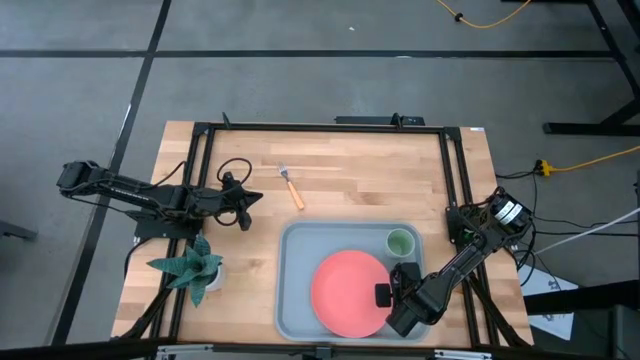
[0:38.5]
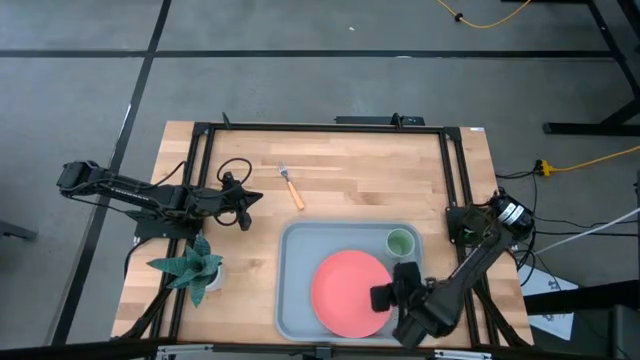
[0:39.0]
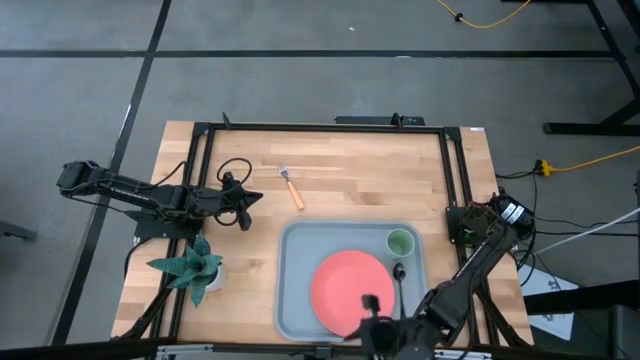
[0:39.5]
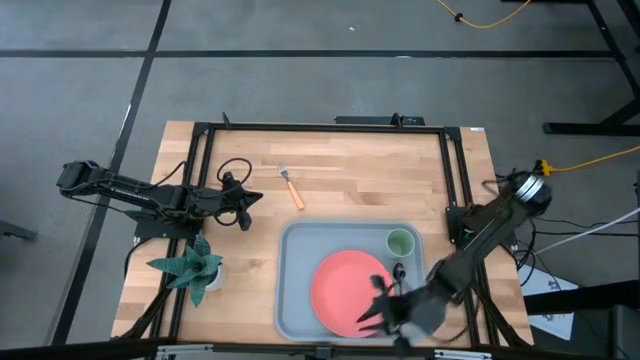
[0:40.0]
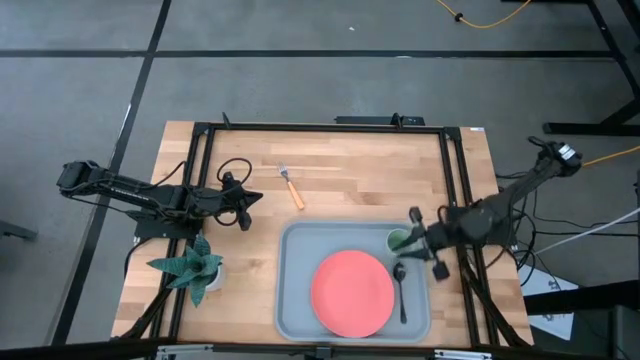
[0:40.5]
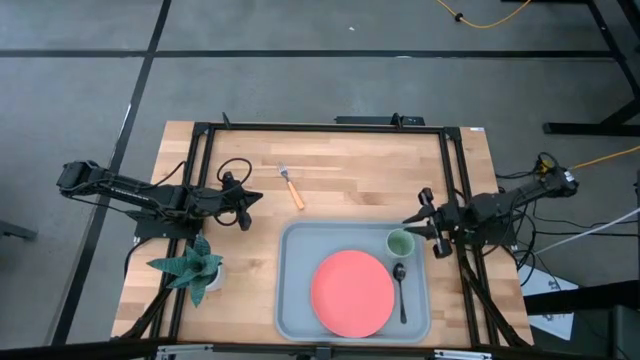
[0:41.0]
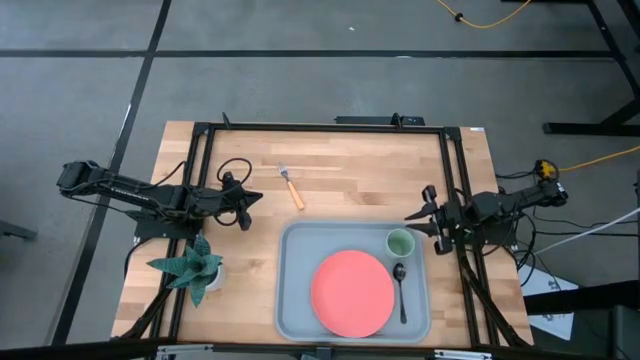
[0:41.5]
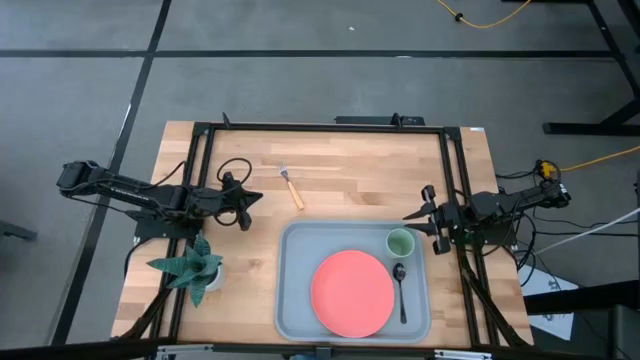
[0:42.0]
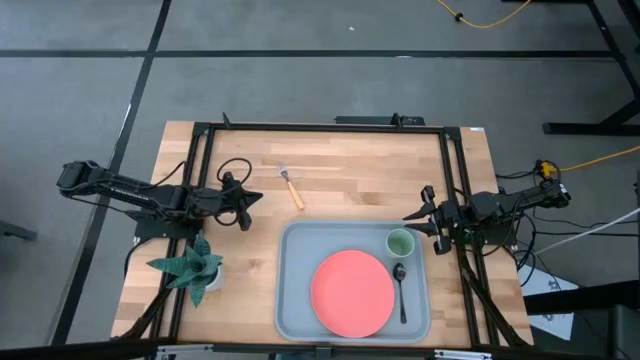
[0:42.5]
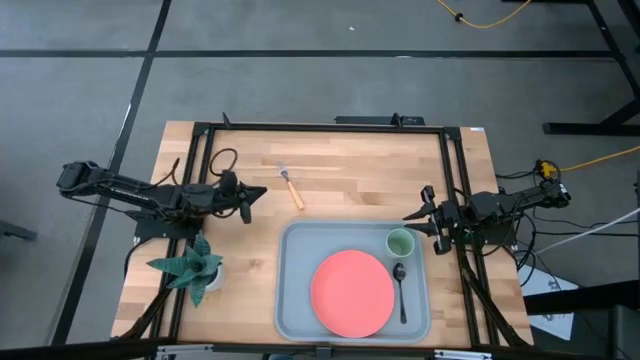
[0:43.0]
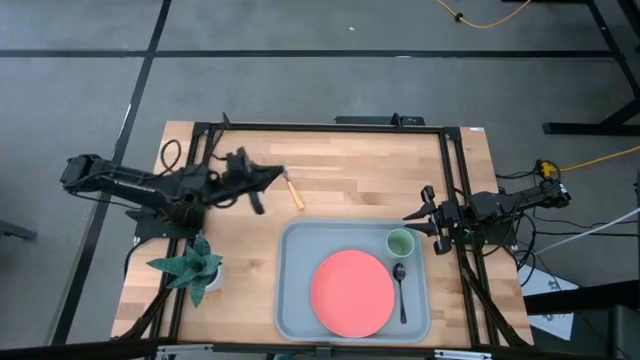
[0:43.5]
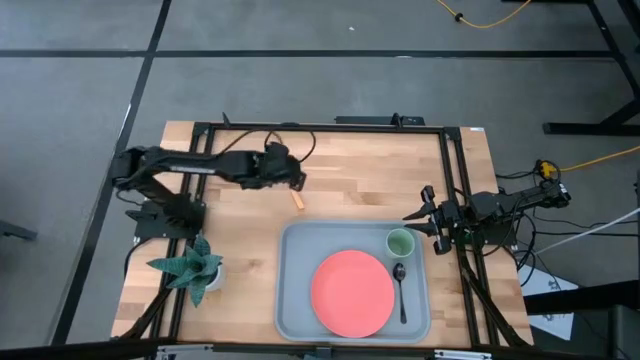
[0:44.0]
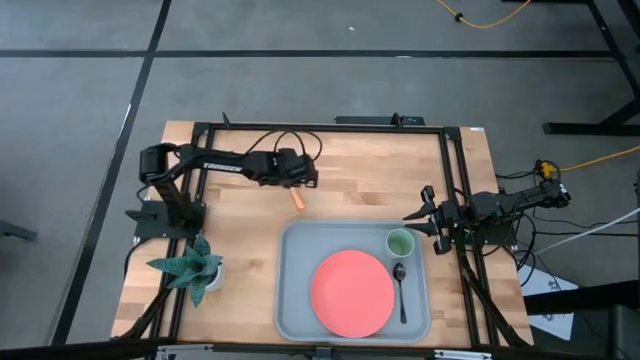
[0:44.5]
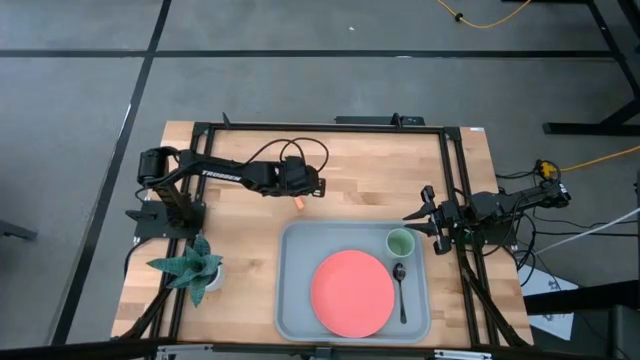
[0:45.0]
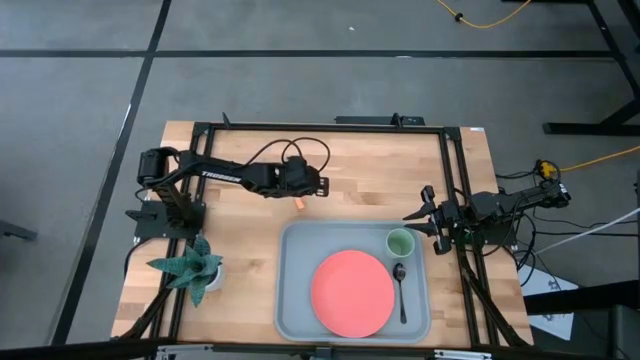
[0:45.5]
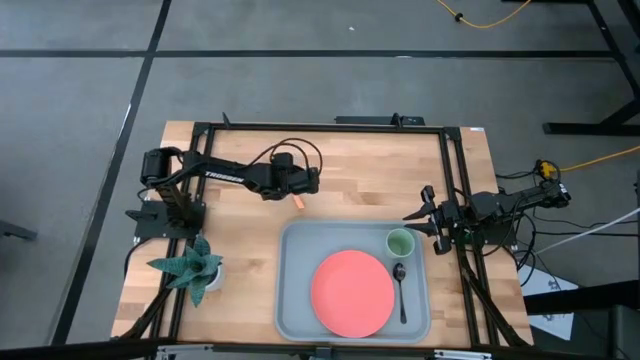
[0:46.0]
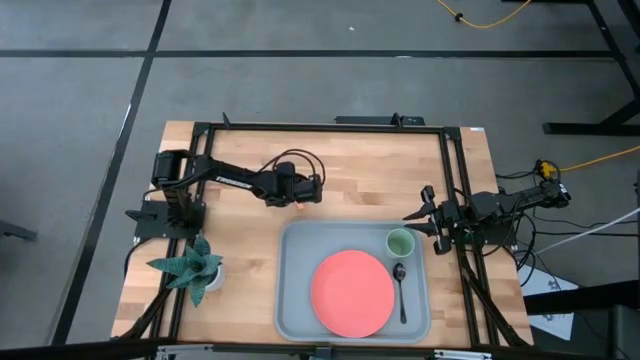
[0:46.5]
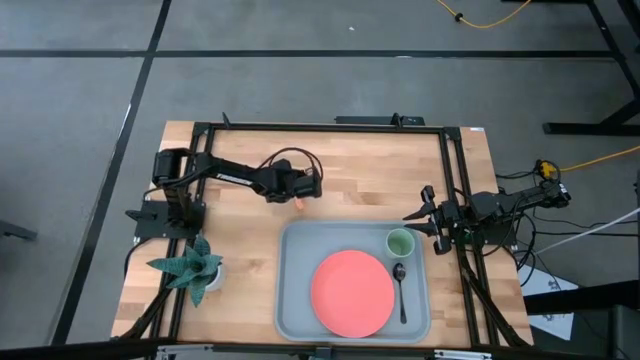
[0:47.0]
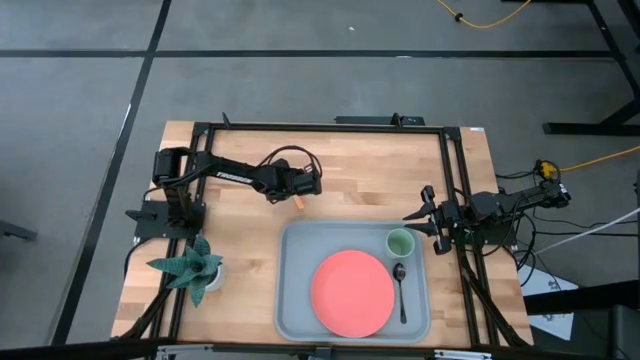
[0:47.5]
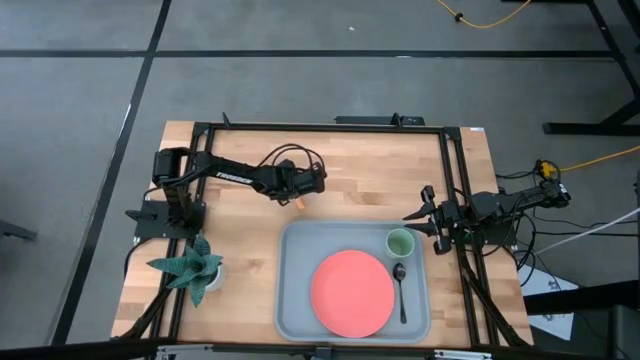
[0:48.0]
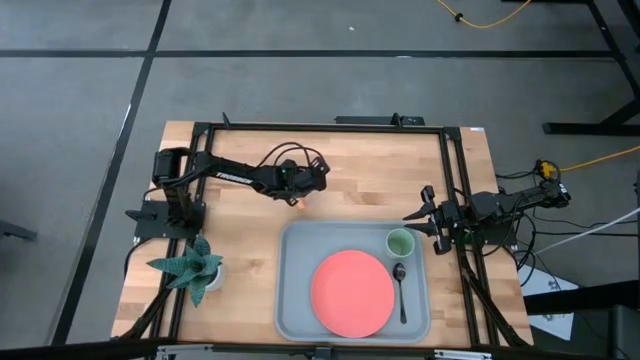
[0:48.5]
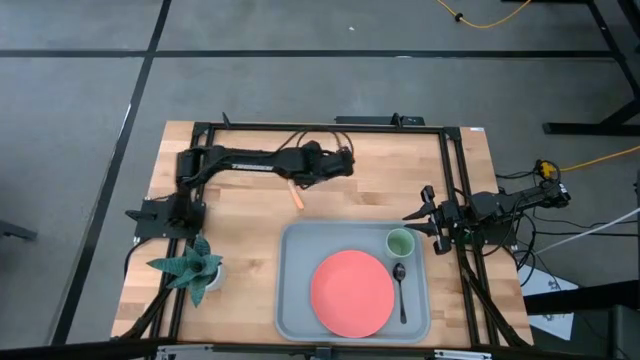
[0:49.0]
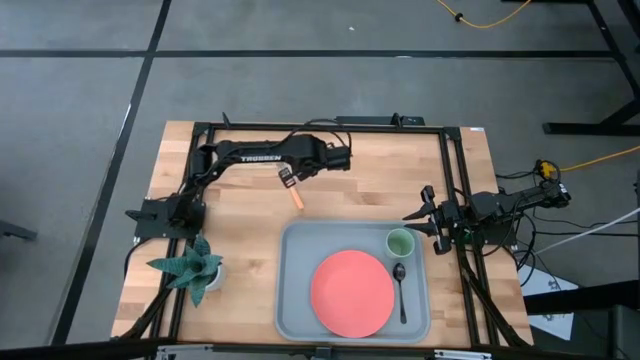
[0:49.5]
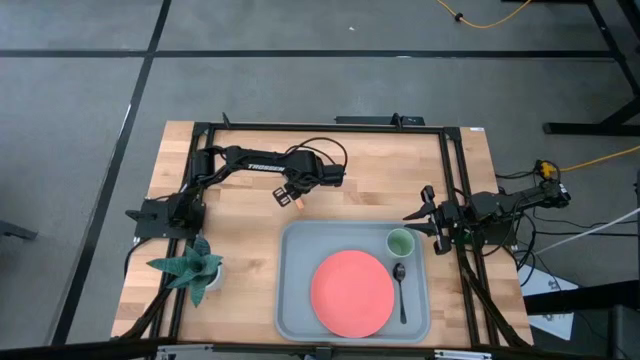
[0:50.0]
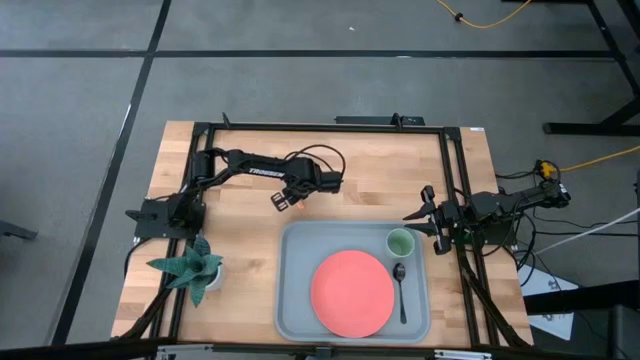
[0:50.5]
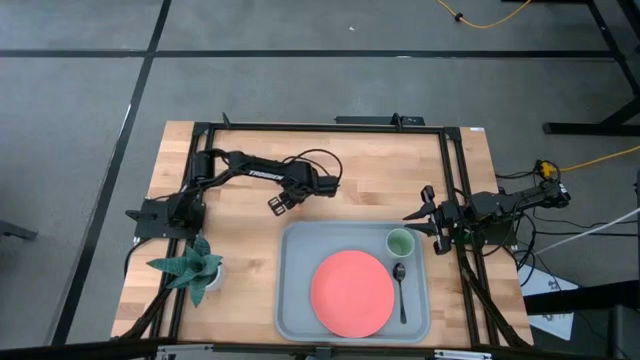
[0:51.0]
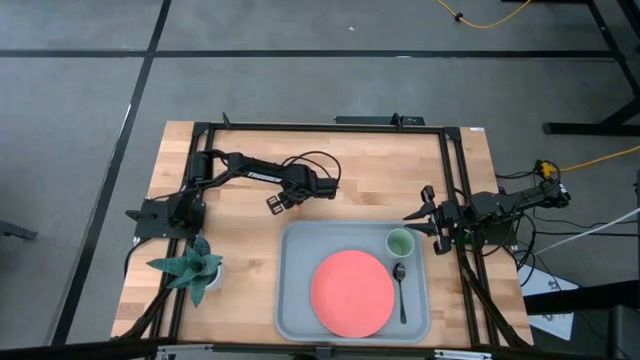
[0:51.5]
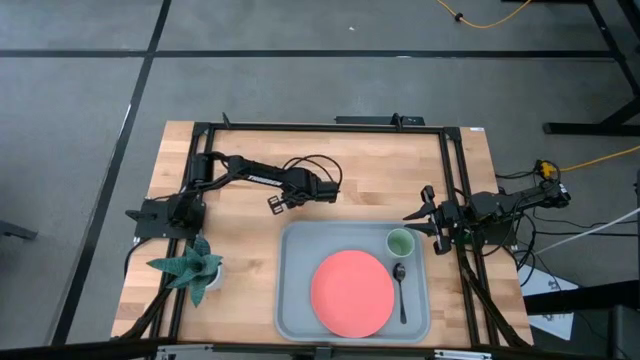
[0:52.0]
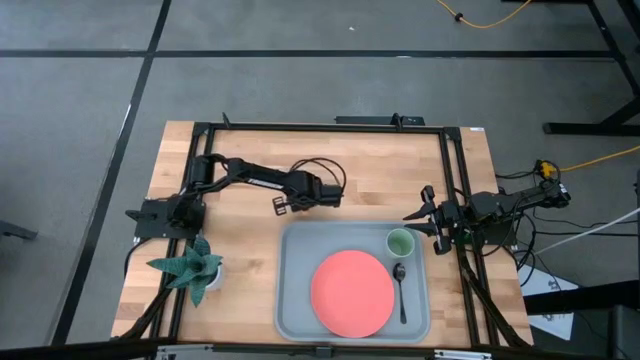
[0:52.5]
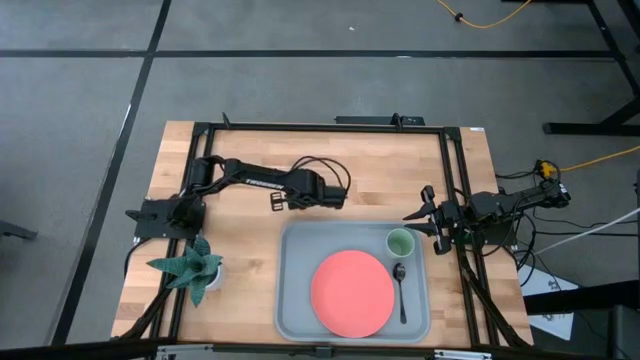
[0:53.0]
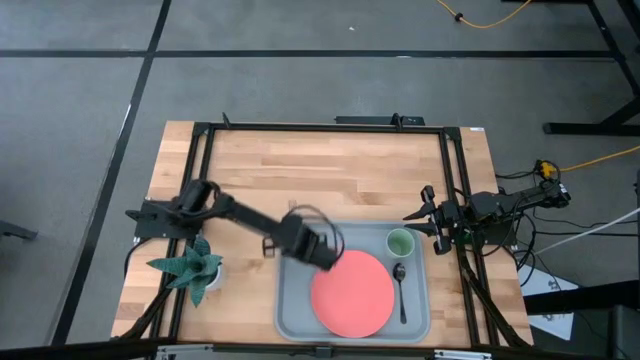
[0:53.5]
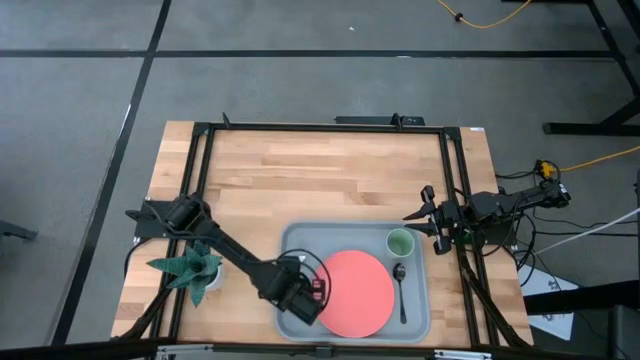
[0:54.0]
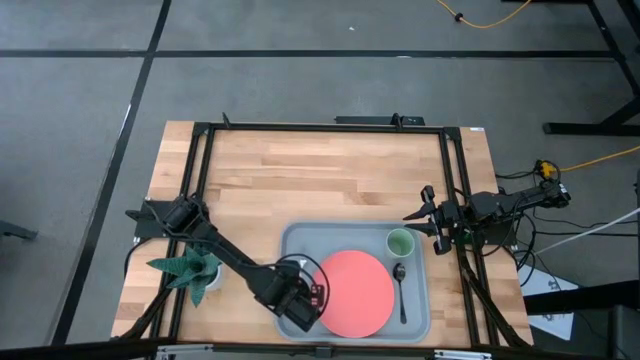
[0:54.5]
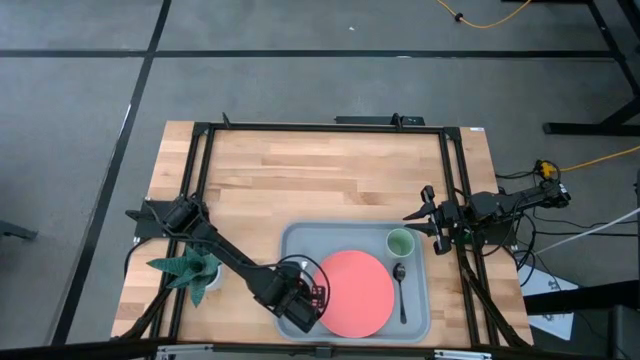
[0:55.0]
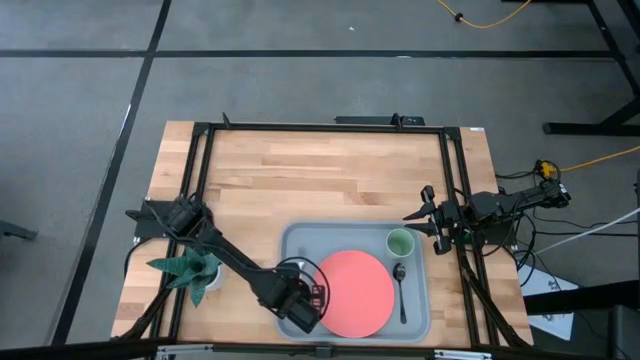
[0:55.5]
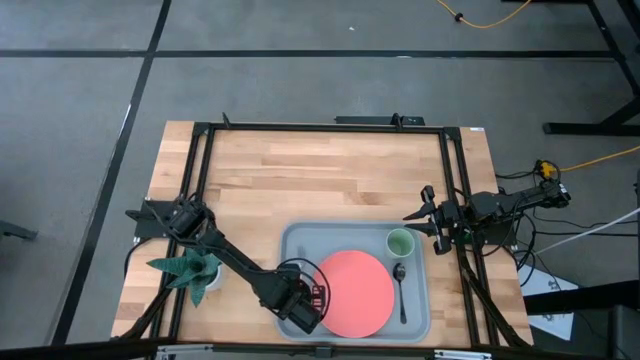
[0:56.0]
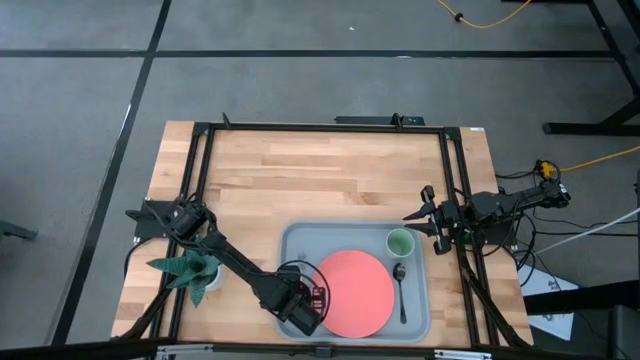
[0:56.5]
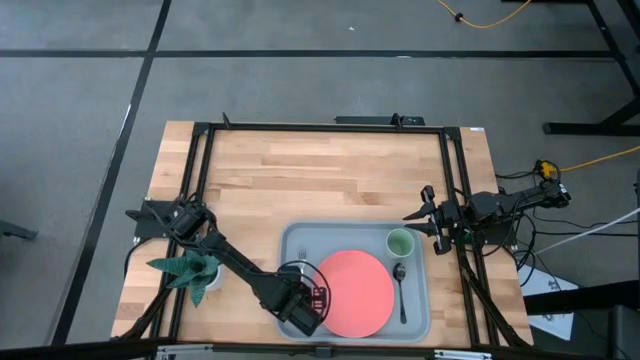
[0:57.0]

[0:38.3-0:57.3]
Task: Pick and place plate/cup/fork/spoon on tray
Put the orange fork on the gray serving tray to the left of the pink plate

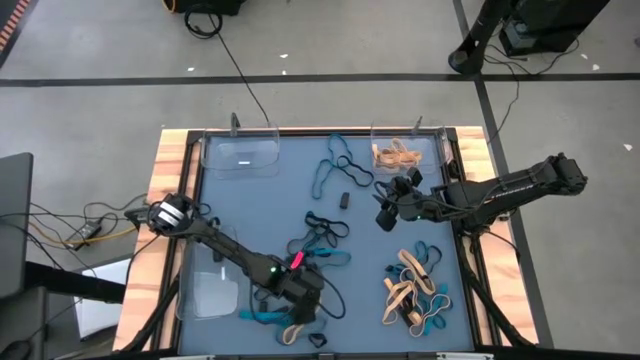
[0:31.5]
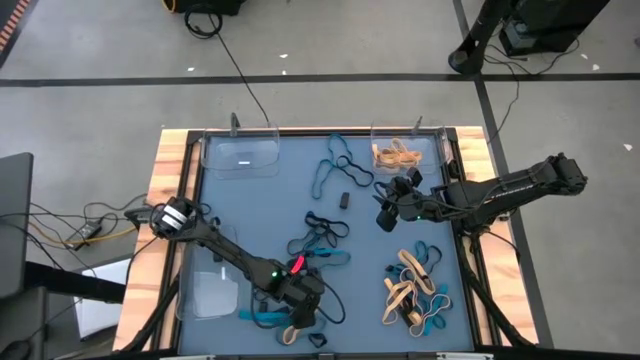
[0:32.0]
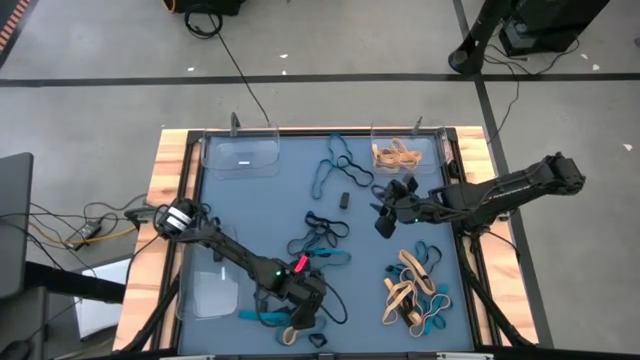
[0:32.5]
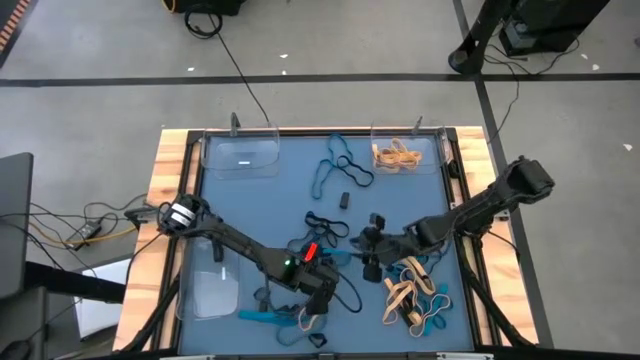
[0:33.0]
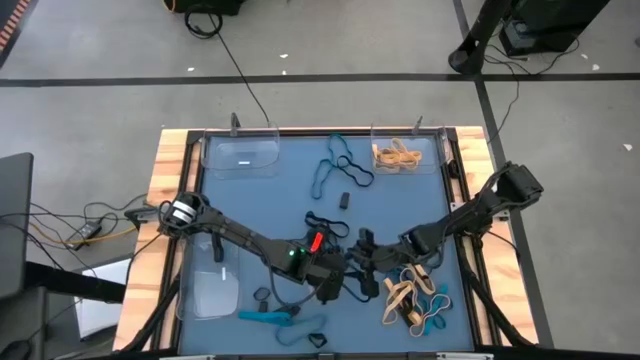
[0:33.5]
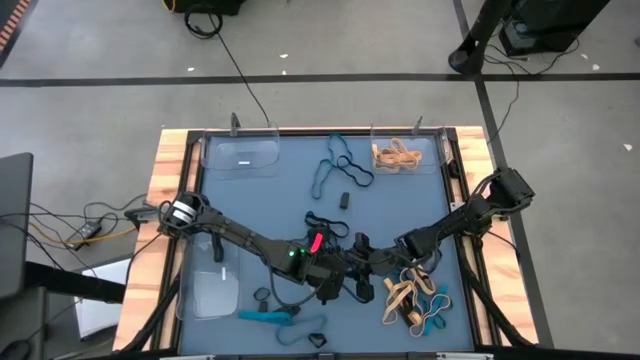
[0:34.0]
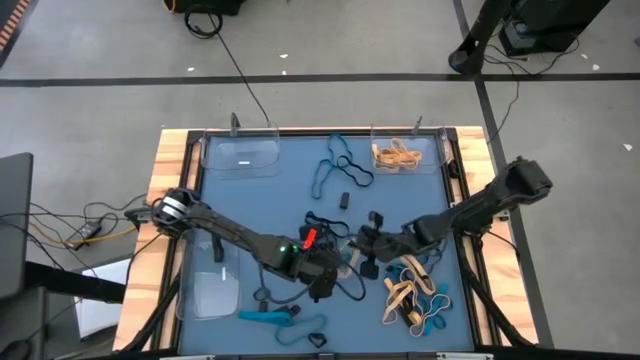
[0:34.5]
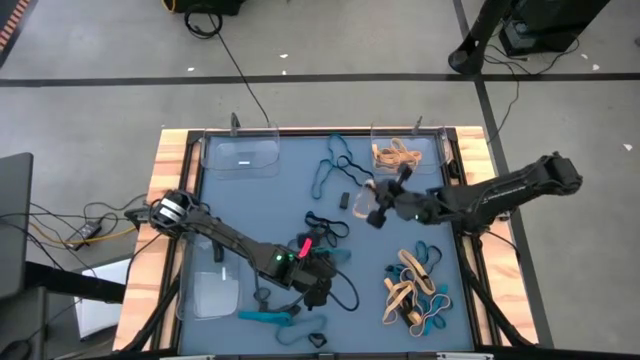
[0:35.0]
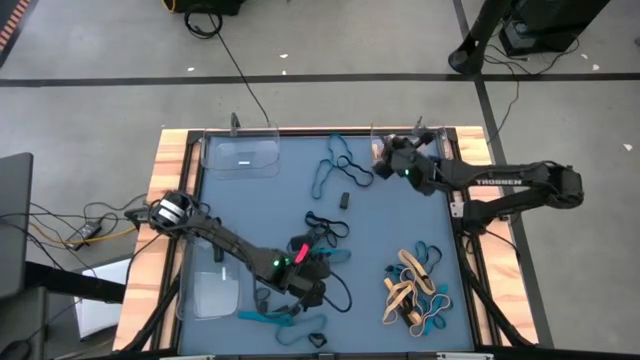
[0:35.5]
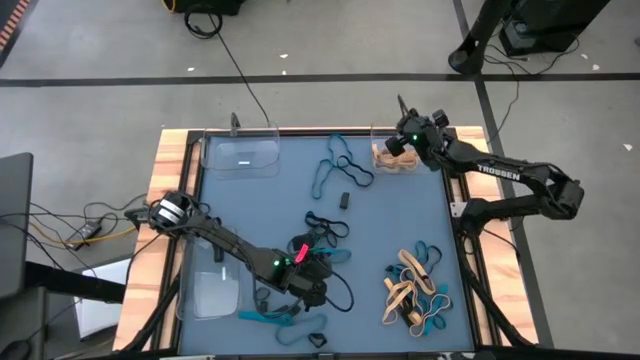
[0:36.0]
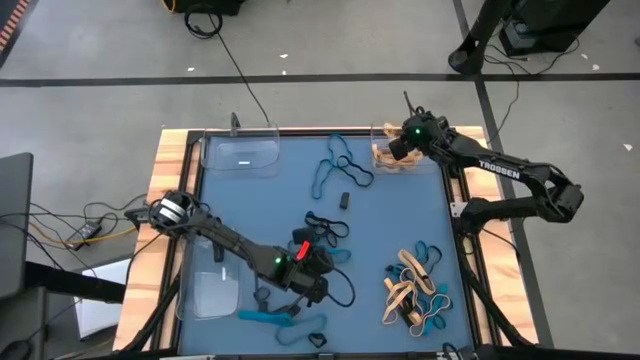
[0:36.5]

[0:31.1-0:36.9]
Task: Sort rubber bands into baskets
Put the yellow rubber band into the top right transparent bin
